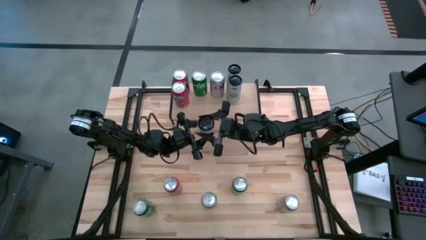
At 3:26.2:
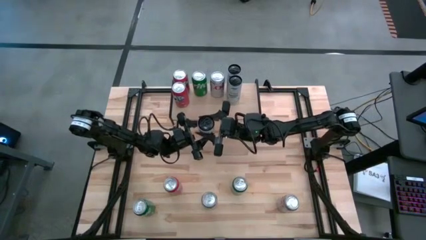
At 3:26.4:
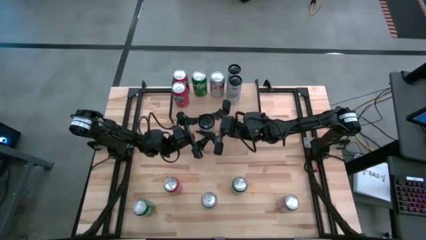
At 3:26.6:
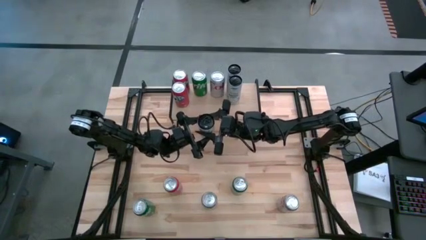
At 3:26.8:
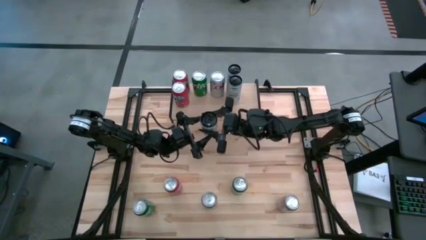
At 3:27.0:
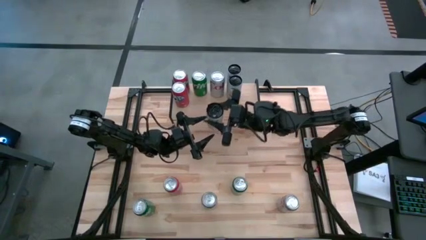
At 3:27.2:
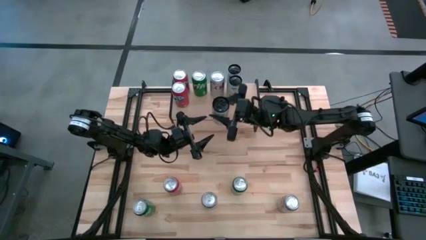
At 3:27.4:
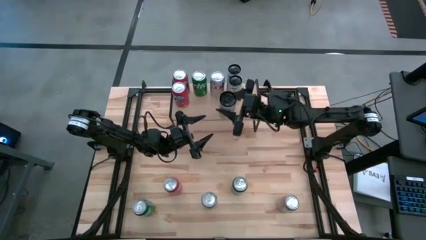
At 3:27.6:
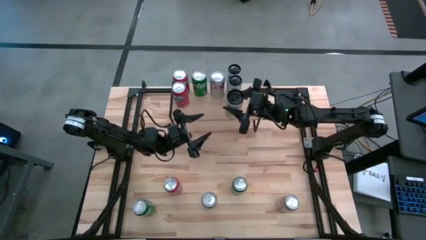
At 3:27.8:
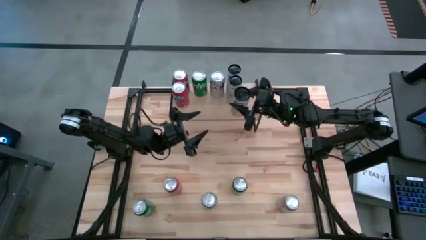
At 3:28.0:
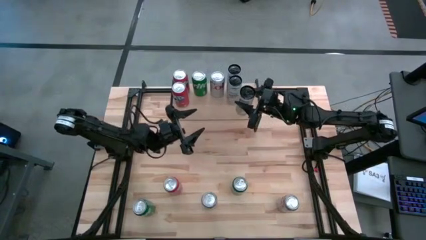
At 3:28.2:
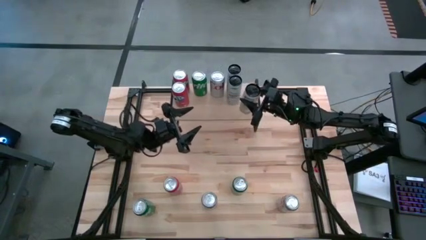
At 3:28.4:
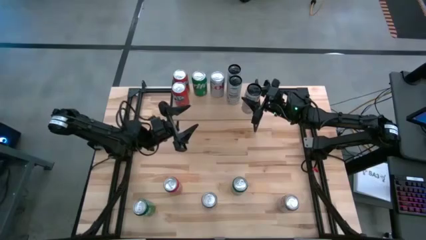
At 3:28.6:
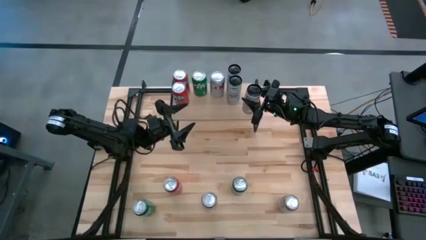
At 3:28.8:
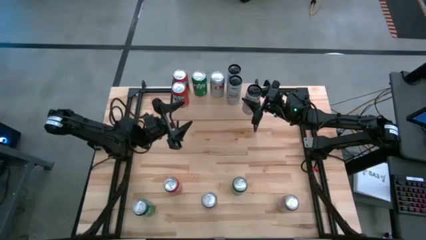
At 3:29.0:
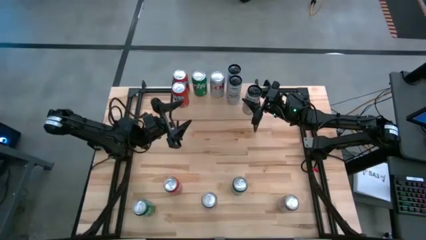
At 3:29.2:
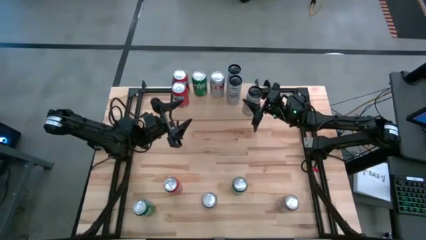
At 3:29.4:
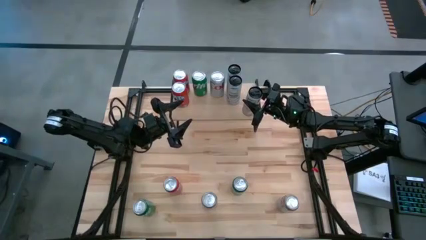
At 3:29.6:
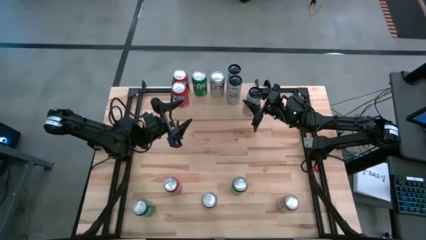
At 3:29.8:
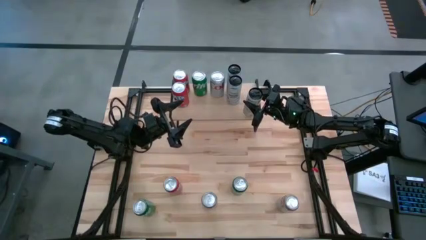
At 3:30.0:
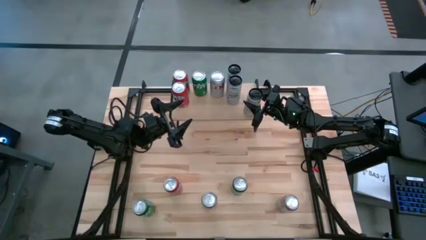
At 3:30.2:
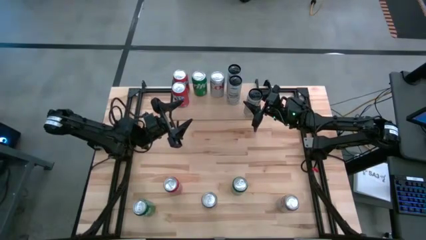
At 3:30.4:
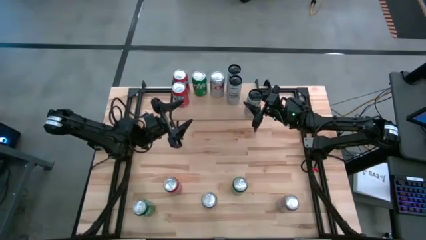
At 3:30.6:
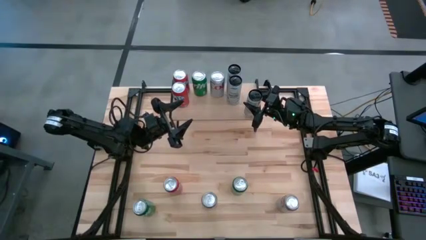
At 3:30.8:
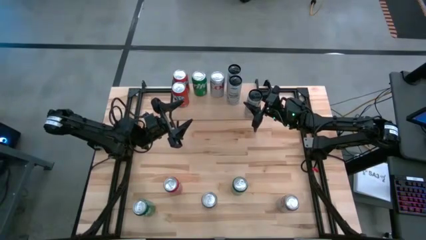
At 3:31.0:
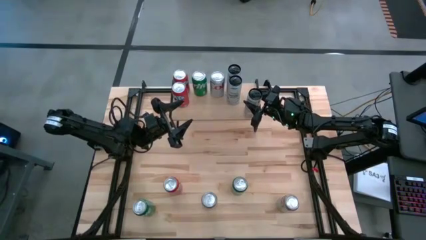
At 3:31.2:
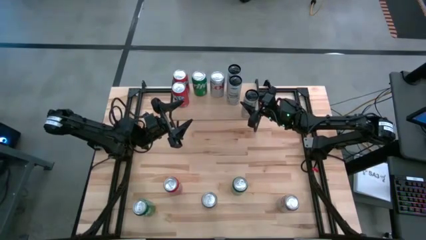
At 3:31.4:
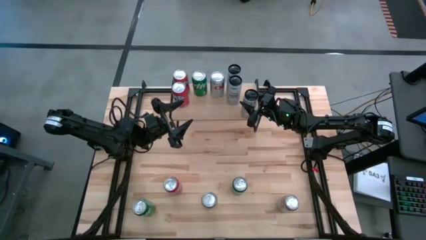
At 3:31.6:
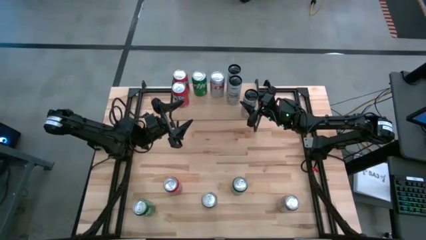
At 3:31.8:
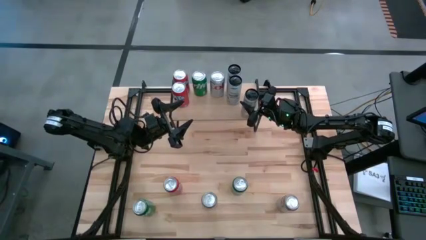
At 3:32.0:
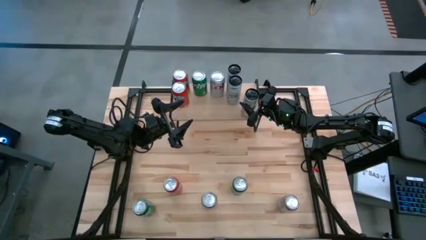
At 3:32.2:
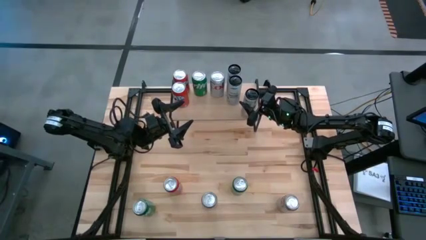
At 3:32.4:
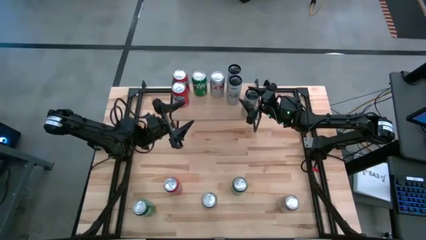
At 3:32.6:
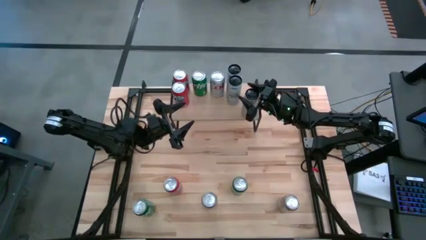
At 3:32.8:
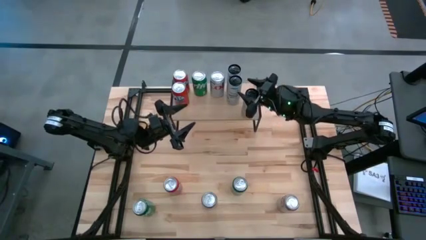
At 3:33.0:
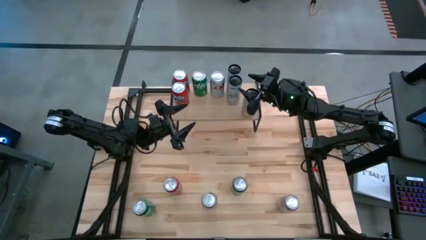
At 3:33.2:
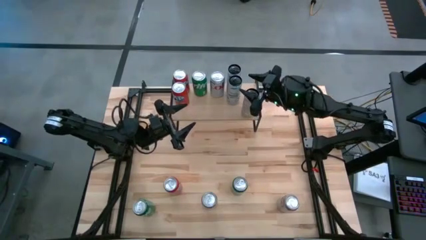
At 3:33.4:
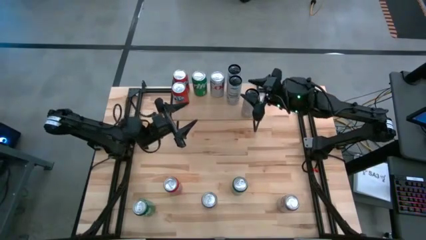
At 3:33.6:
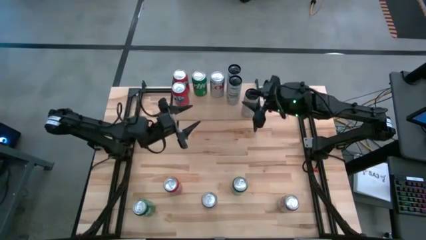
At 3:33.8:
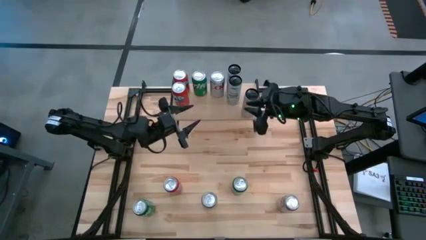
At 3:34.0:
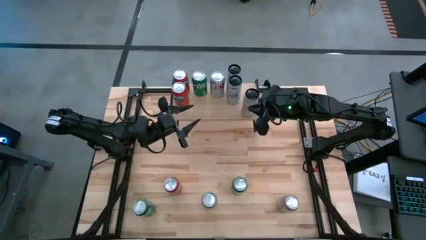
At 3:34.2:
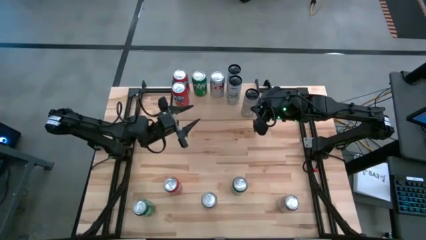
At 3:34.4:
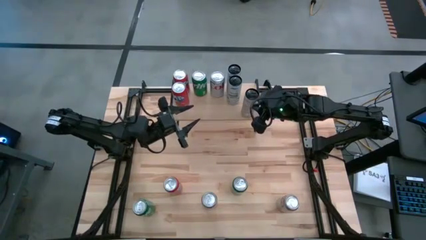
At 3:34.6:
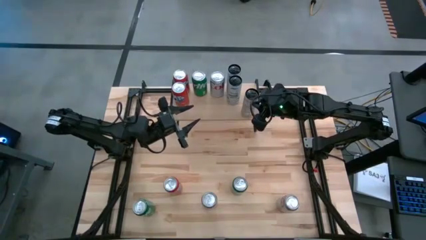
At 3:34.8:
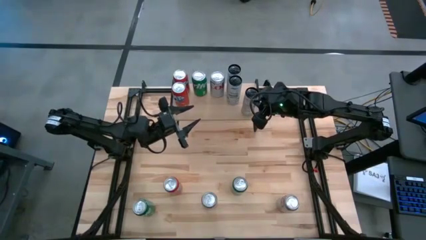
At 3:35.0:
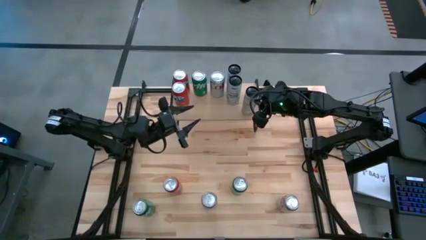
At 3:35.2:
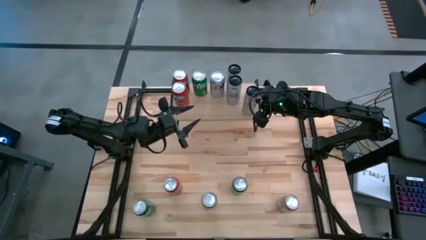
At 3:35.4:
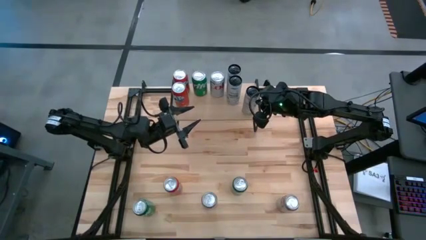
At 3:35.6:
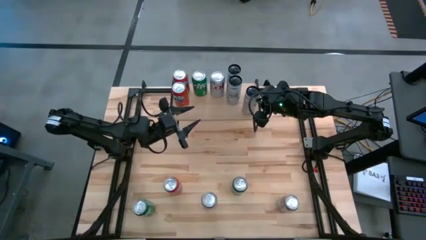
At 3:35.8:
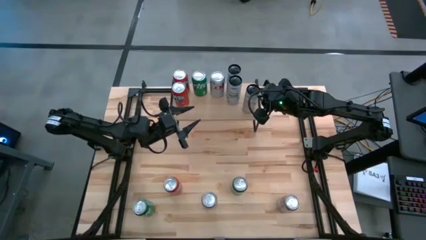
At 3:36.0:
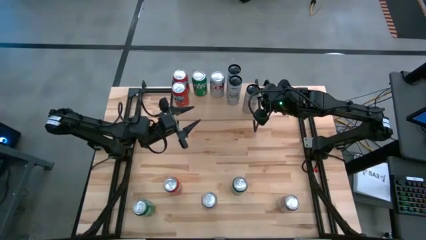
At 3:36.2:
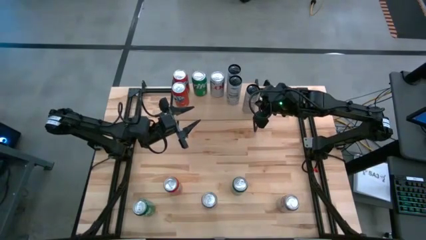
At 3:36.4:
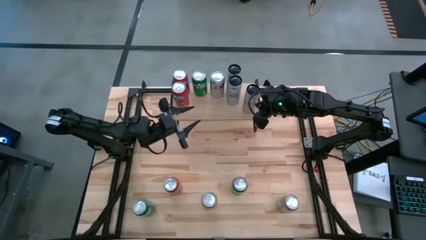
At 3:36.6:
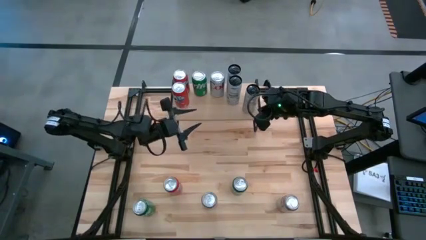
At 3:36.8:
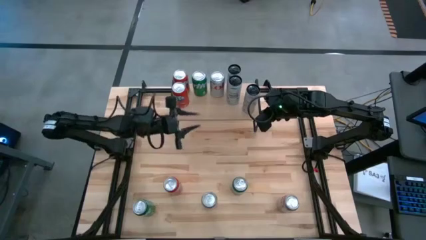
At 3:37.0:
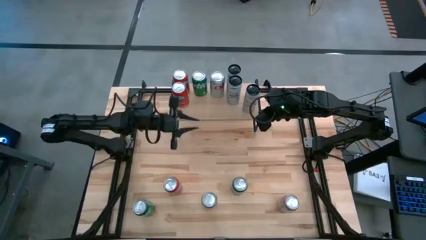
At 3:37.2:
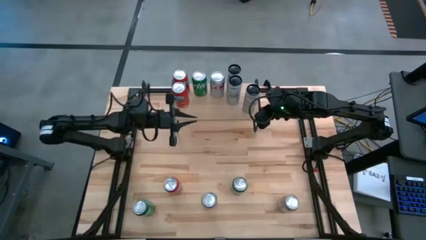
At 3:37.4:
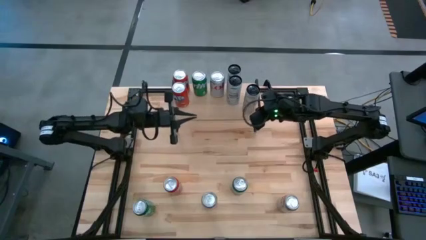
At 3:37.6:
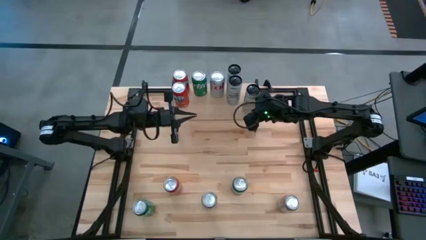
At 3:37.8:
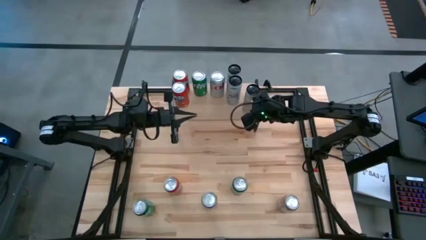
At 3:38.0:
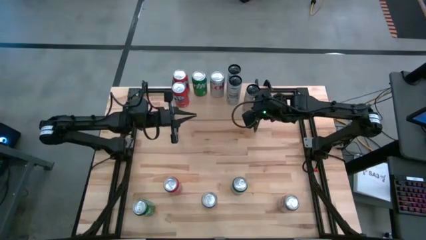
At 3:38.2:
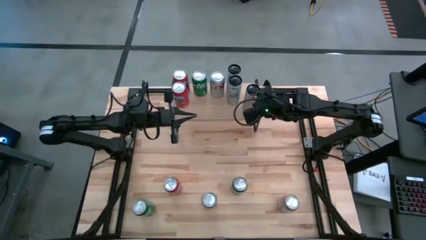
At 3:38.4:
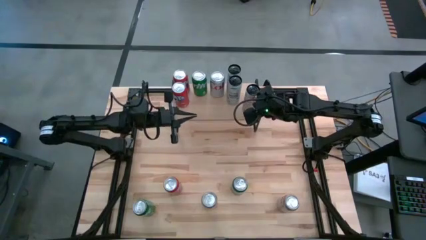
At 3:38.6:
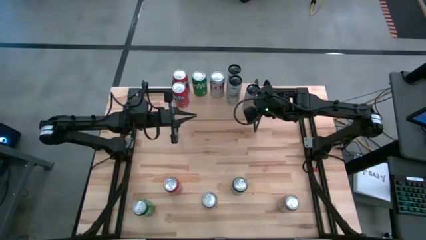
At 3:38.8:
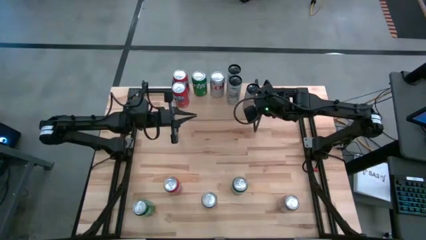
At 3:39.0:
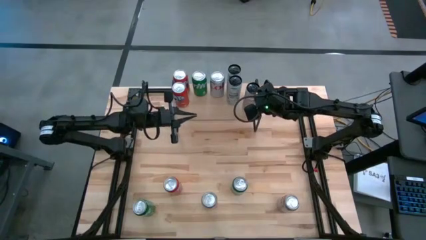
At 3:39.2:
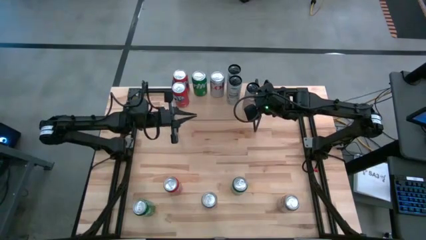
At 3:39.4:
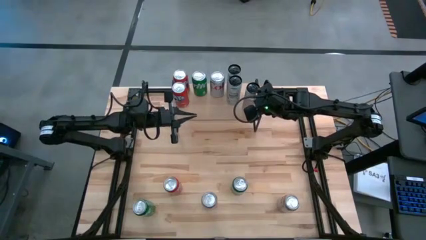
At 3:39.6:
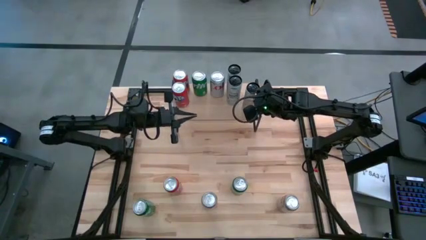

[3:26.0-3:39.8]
Task: Place canned beverage on shelf
Put the white-yellow soda can on the shelf

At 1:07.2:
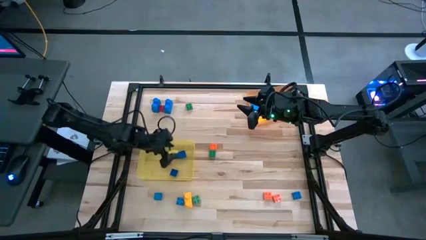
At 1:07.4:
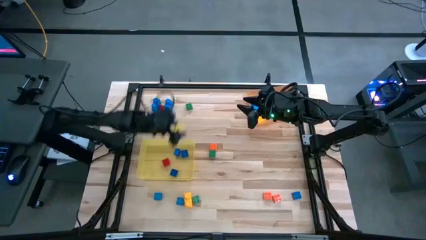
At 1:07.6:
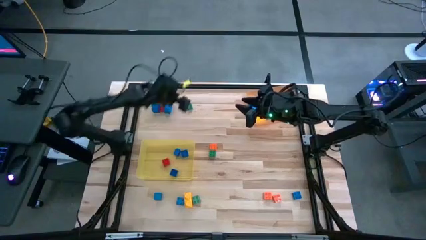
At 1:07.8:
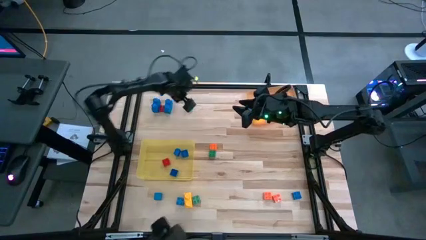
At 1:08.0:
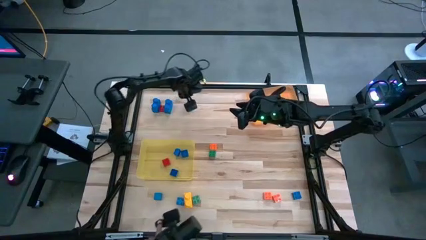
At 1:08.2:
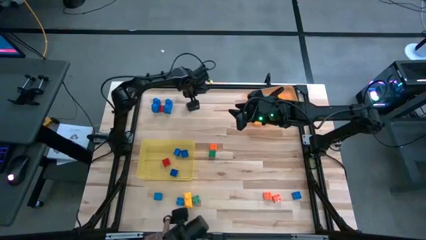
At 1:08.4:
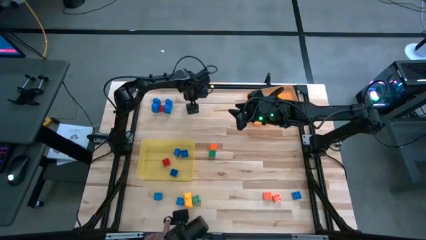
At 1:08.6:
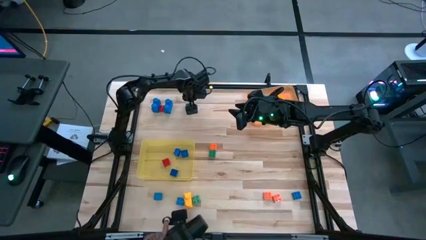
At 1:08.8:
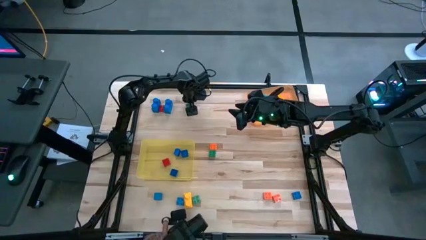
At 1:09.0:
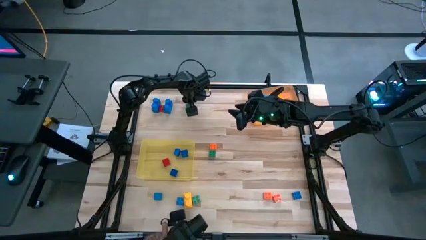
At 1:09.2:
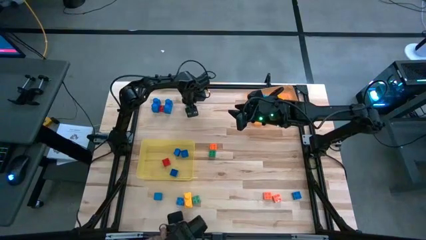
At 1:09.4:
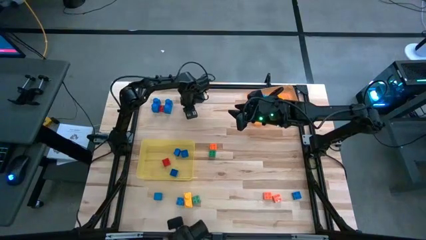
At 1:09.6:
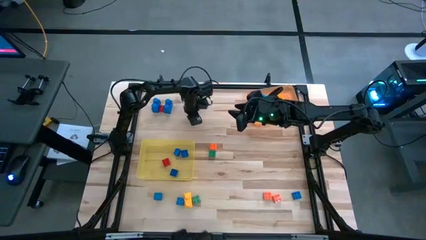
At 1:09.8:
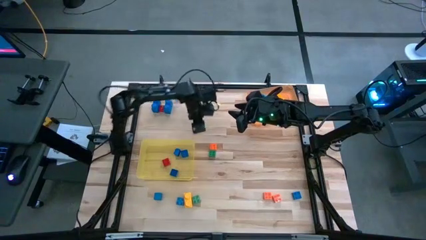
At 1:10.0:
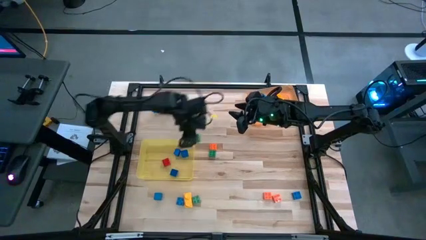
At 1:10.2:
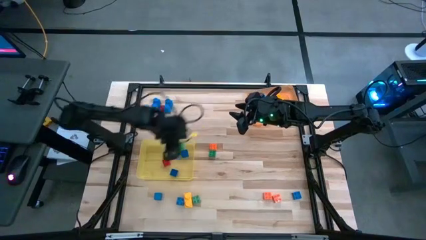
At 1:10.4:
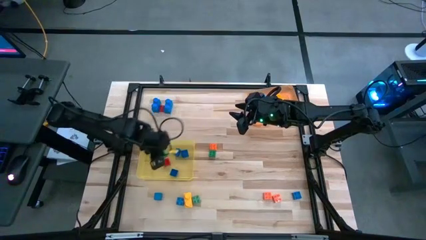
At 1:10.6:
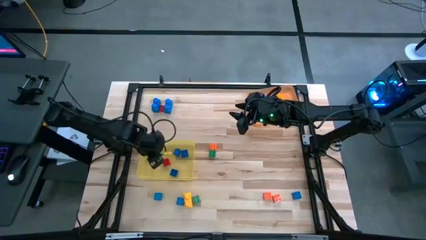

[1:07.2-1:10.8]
Task: Sort blocks by size
Put the small 4 stud green game piece into the yellow bin
